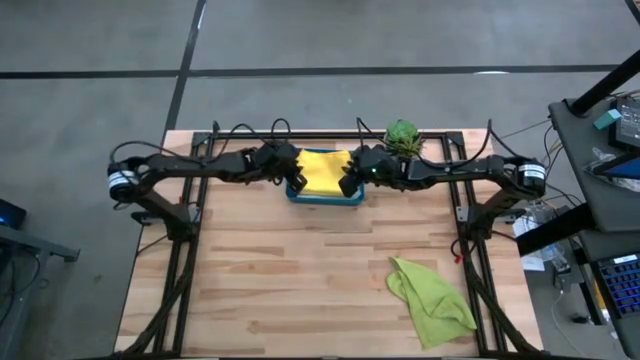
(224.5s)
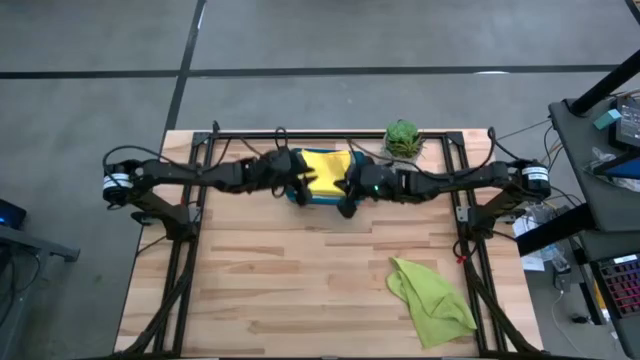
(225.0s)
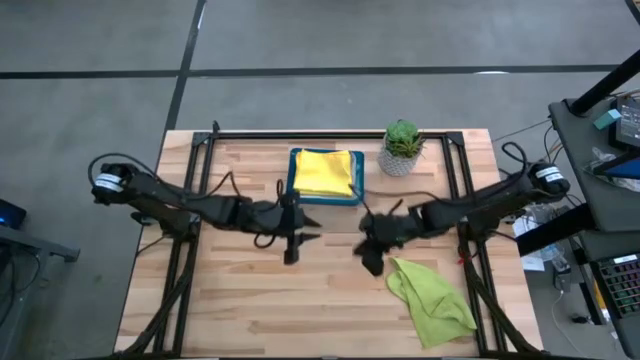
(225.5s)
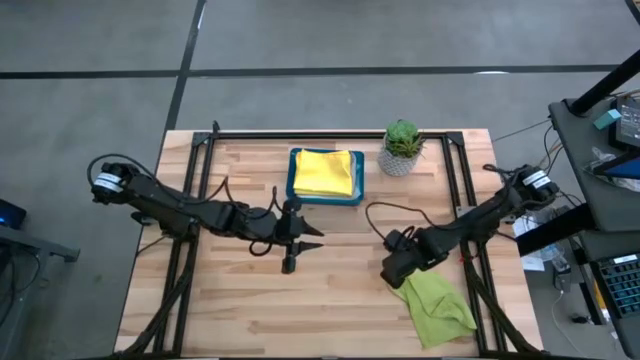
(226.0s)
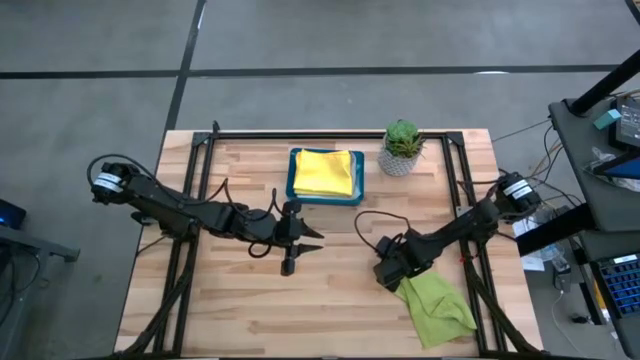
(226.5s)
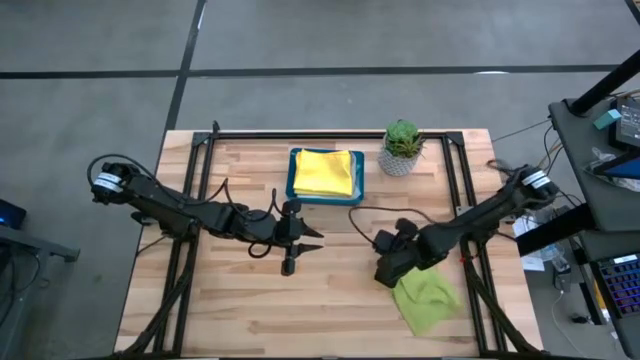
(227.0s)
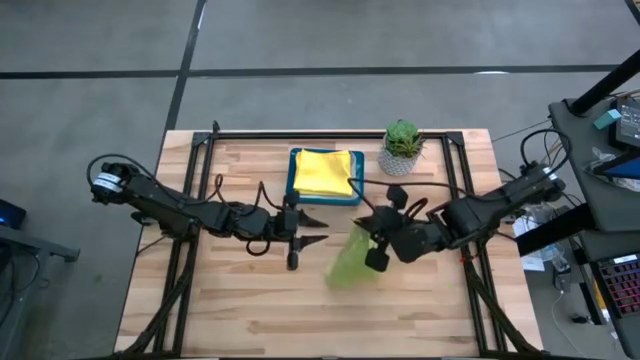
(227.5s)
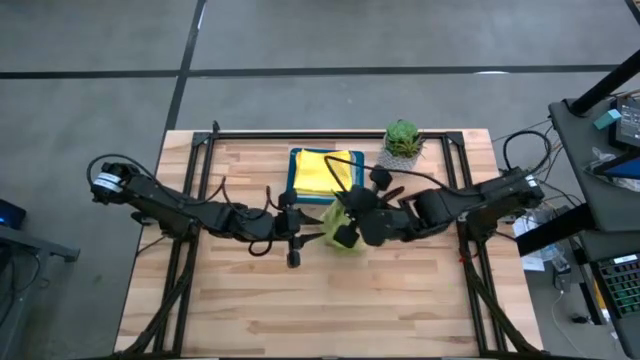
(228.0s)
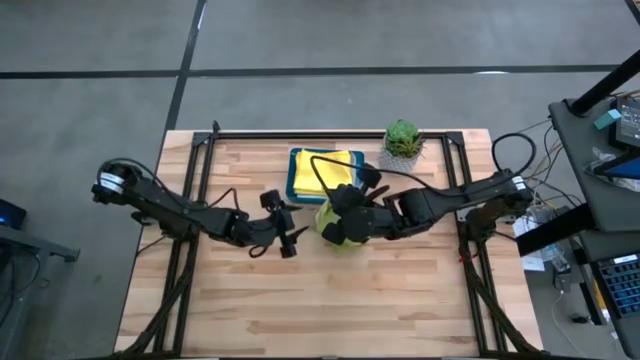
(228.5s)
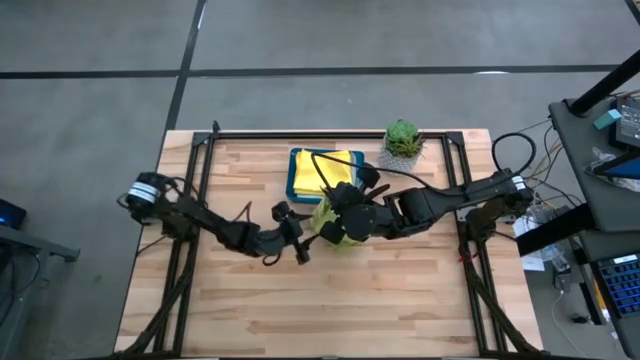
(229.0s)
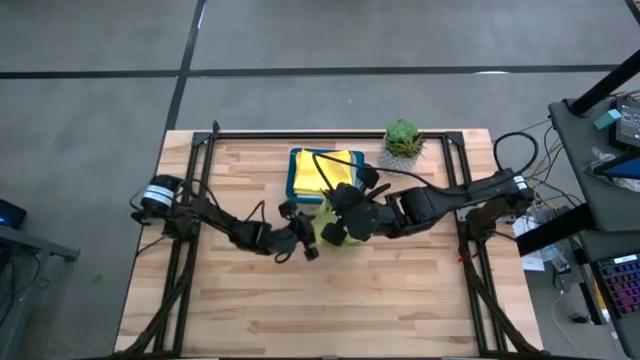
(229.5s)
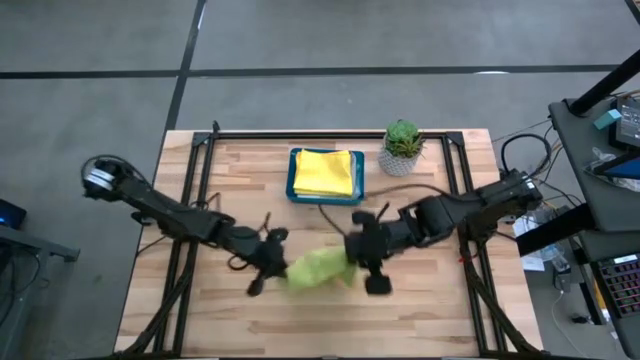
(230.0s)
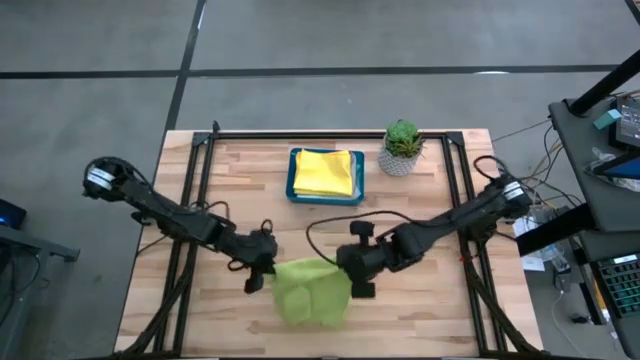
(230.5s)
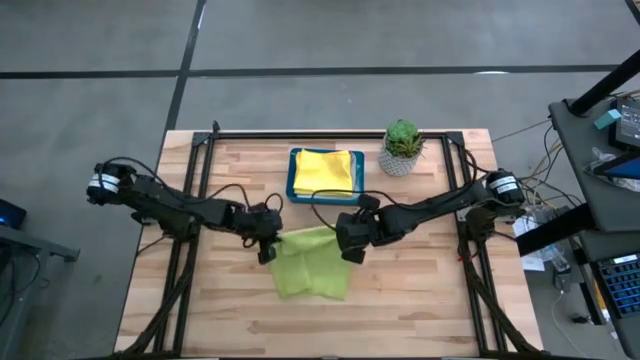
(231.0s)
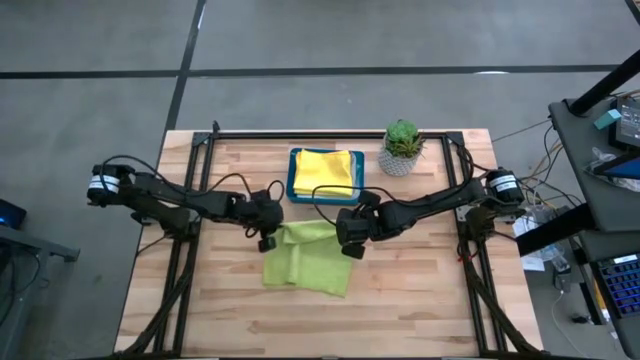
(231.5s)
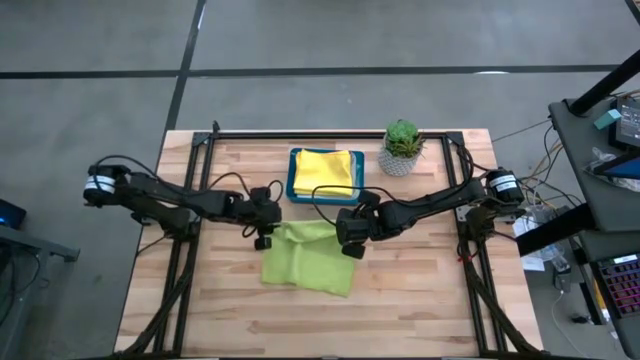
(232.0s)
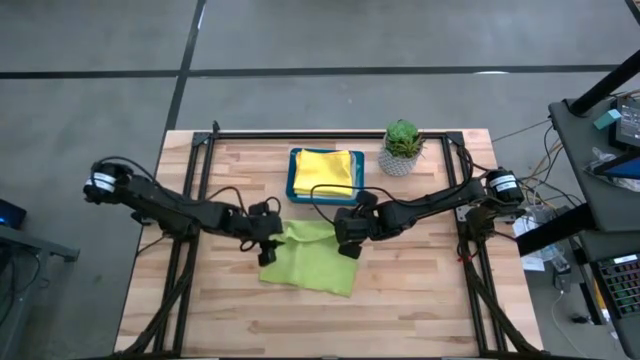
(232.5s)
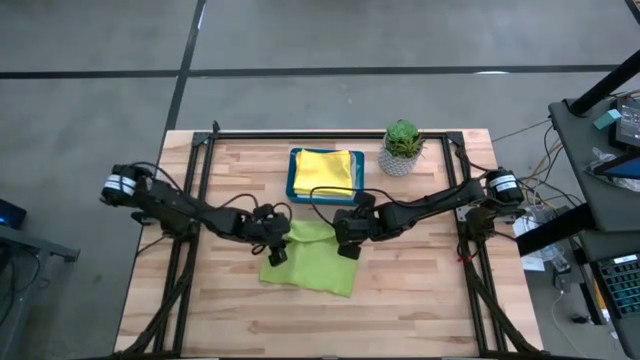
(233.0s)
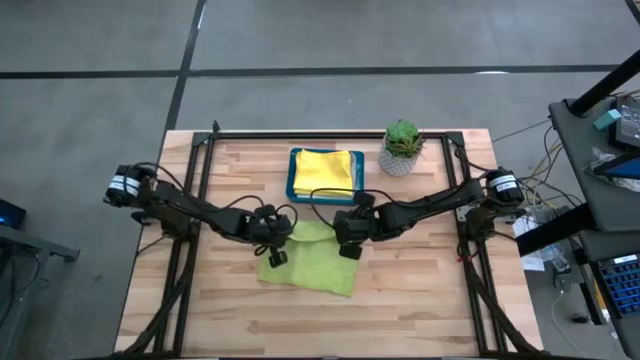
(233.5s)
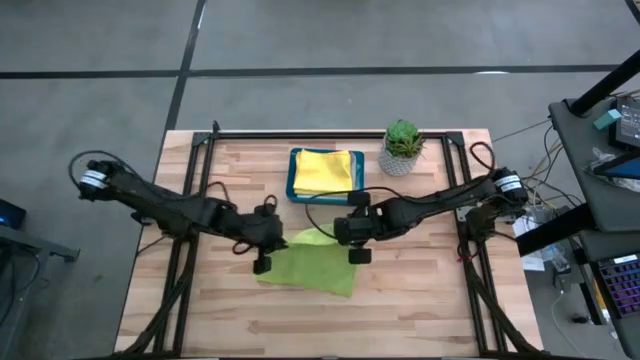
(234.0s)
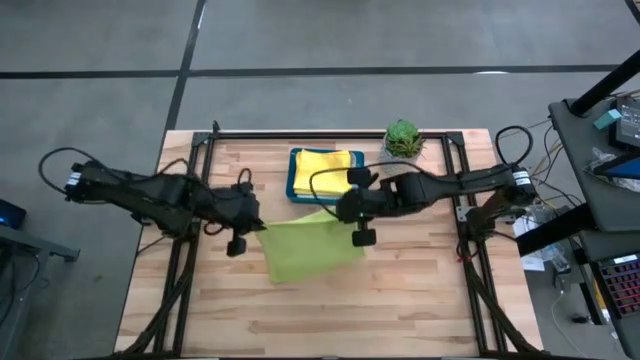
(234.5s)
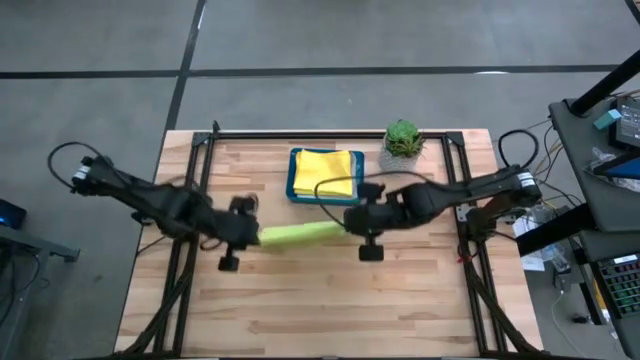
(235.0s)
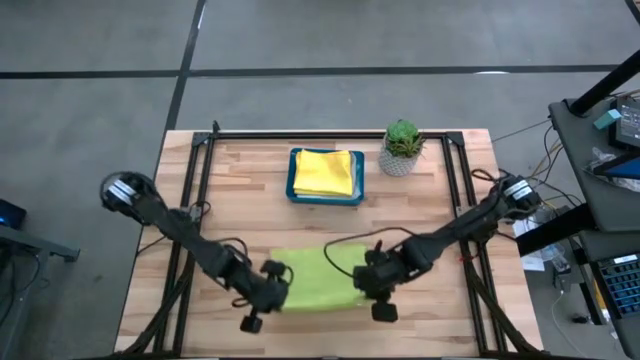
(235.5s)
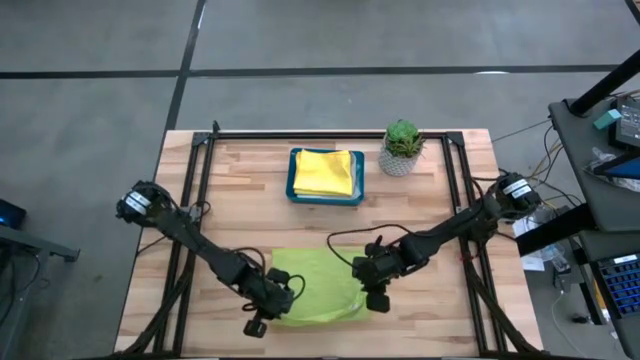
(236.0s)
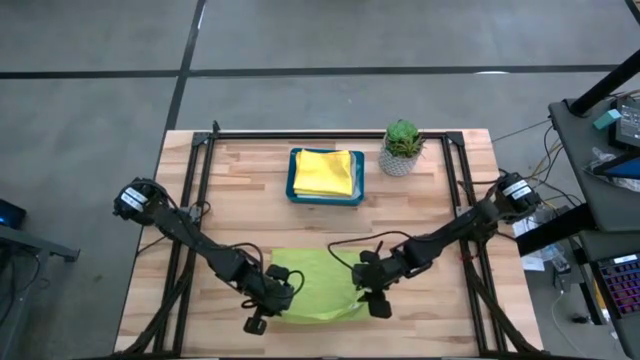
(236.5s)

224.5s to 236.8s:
Task: Fold microfiber towels
Fold the green microfiber cloth

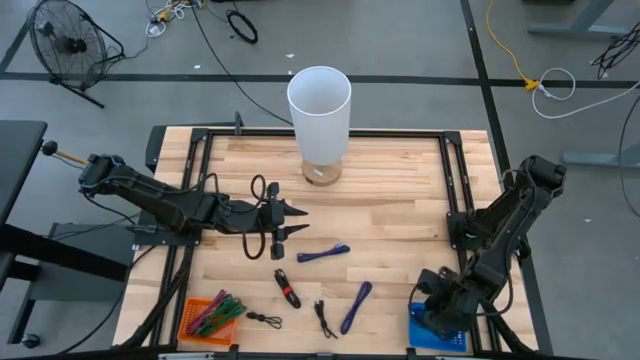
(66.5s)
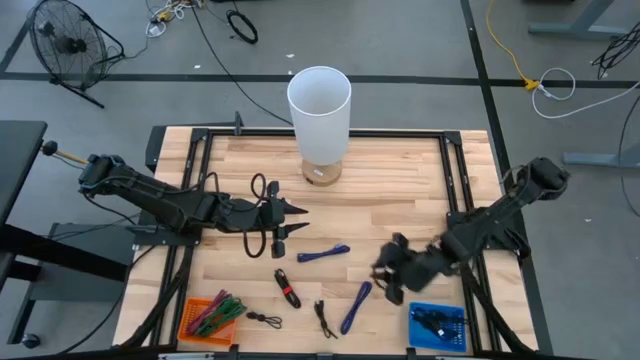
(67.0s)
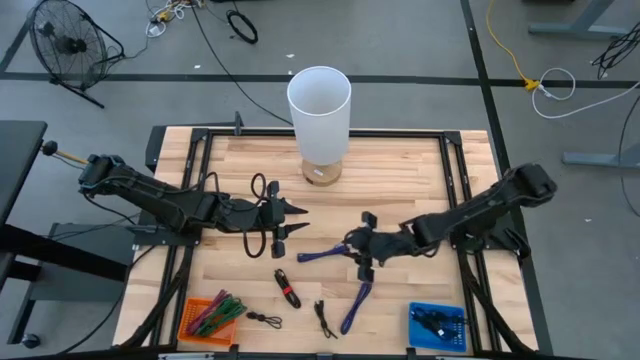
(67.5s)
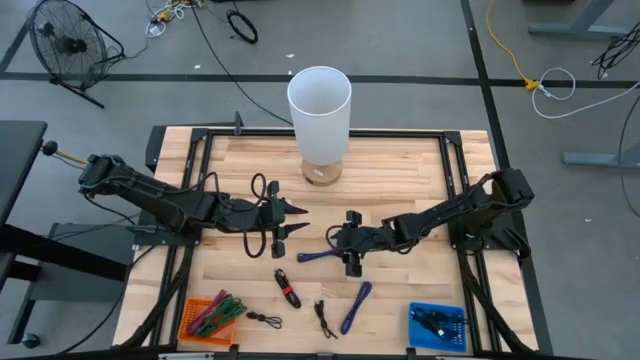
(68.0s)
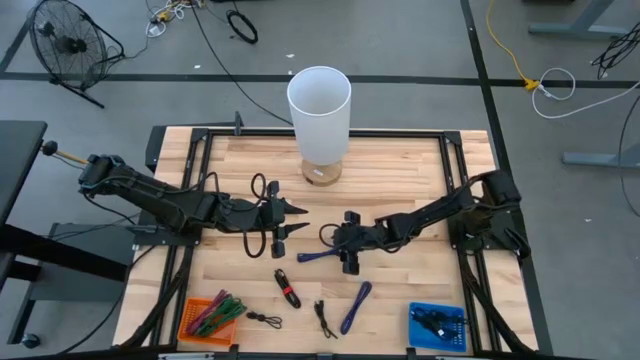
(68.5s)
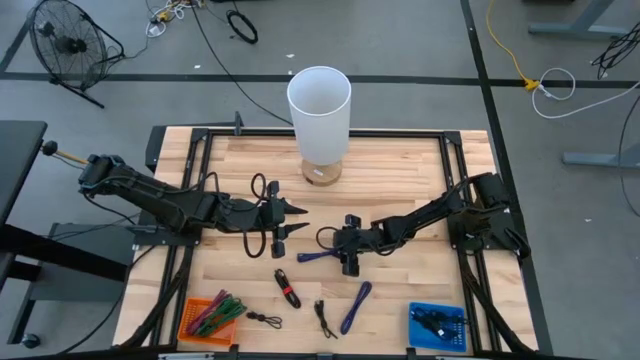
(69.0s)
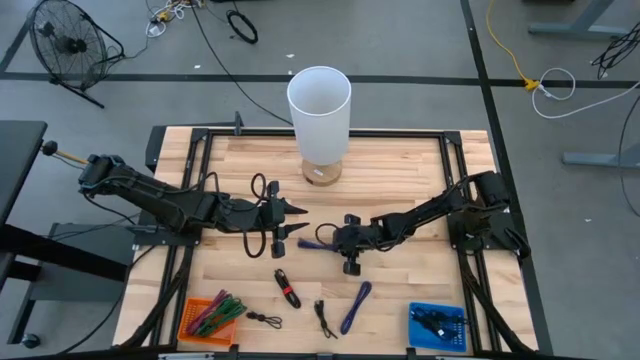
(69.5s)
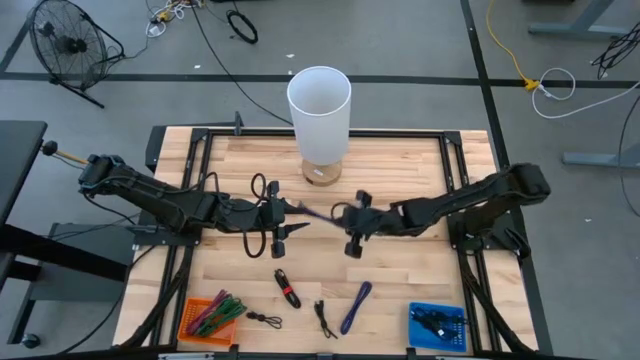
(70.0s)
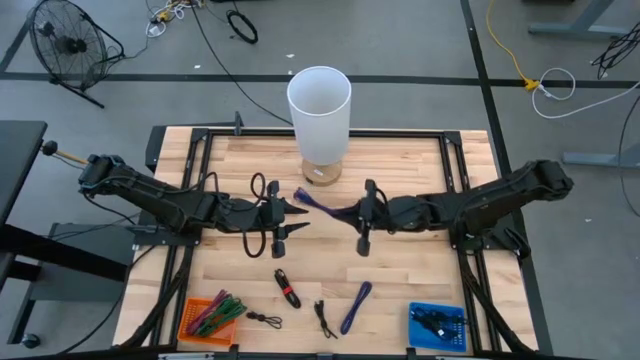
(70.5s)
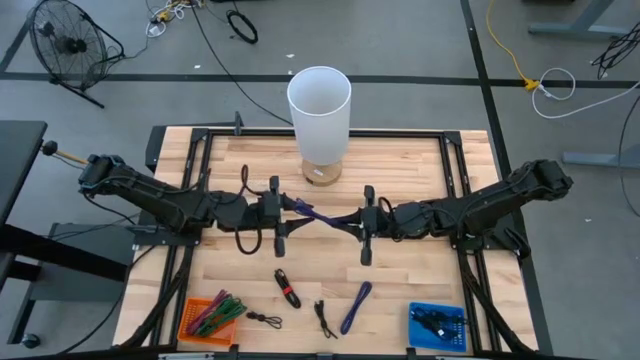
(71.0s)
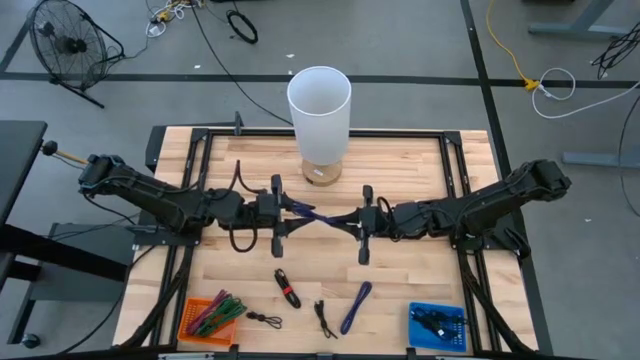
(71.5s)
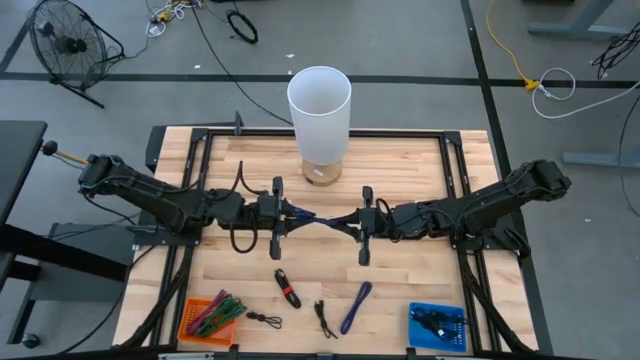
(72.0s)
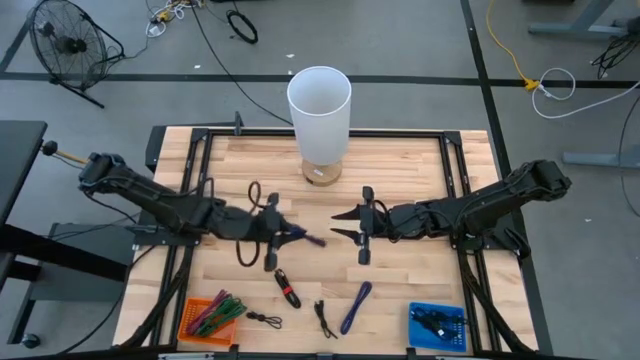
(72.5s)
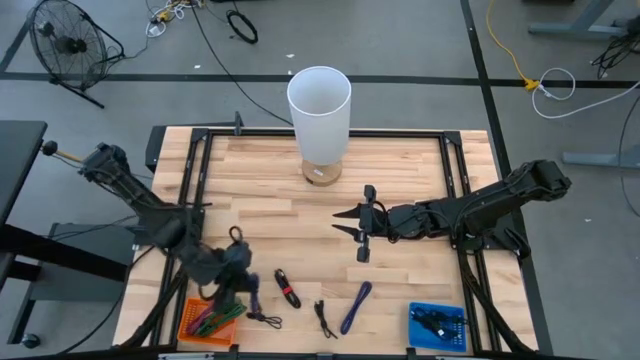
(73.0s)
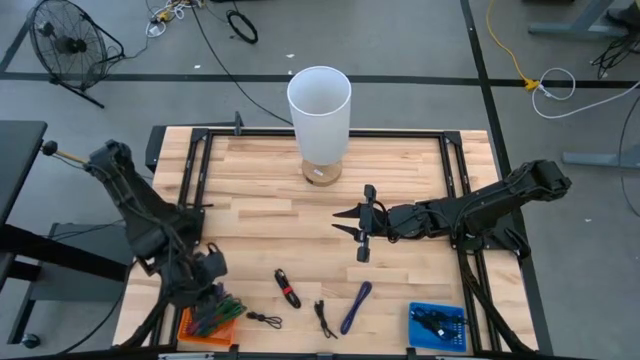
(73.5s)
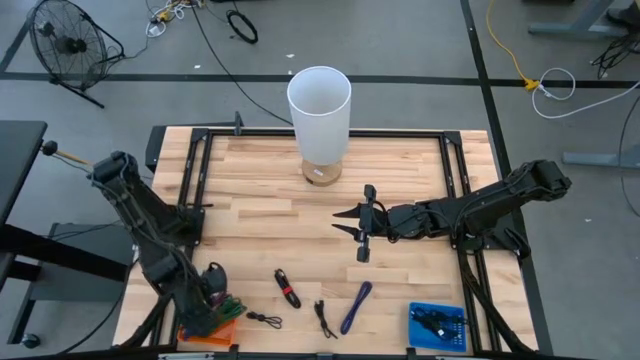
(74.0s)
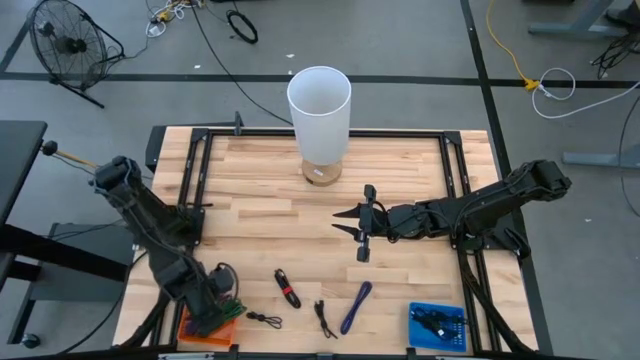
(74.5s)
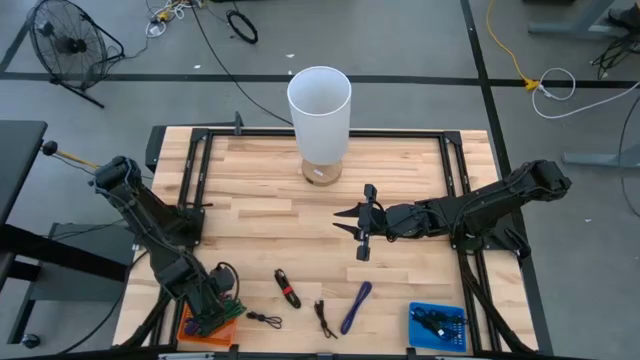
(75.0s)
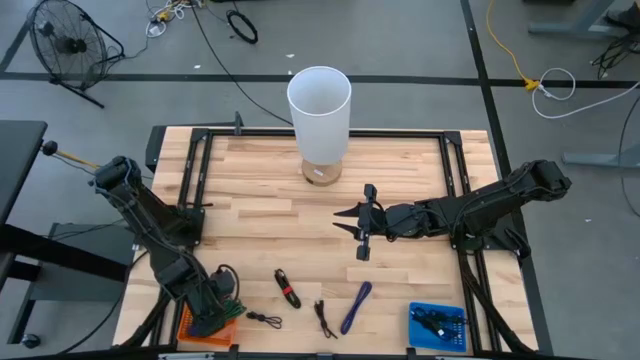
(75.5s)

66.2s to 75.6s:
Task: Pick & Place USB Port
Put the black and violet charger cable into the orange bin
